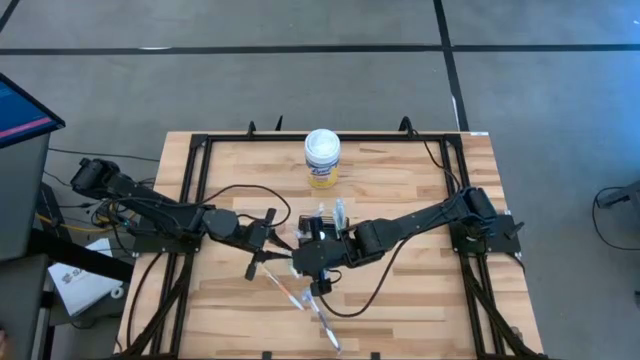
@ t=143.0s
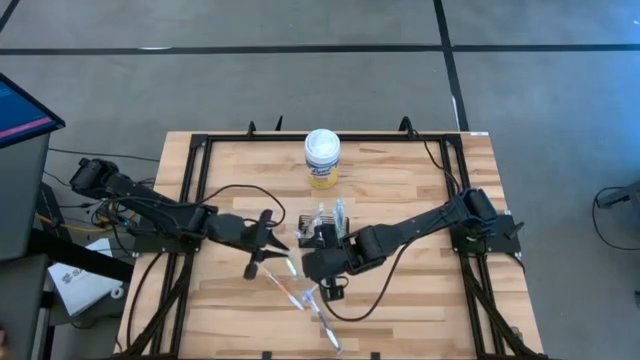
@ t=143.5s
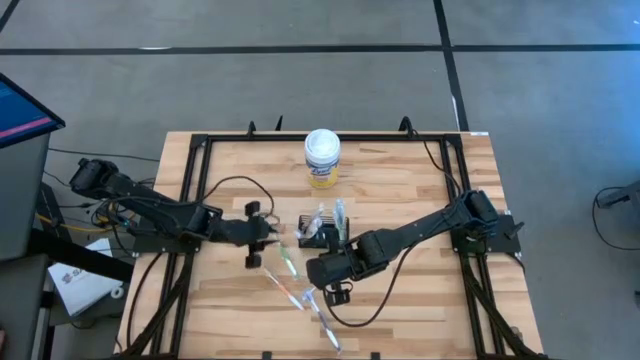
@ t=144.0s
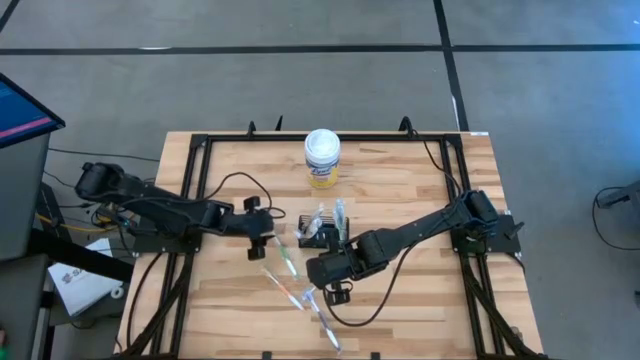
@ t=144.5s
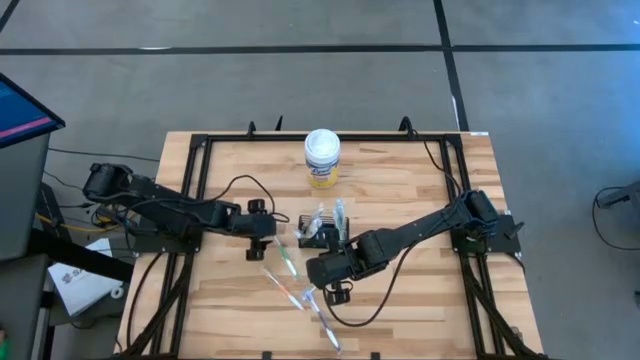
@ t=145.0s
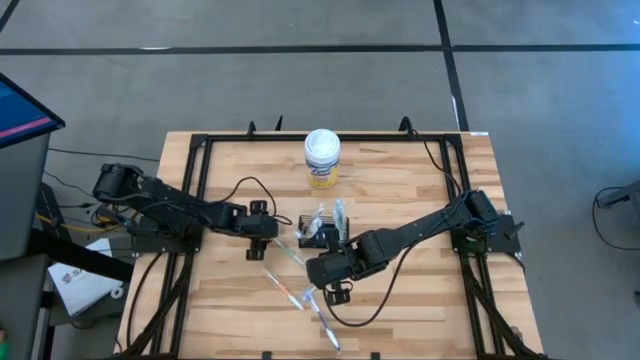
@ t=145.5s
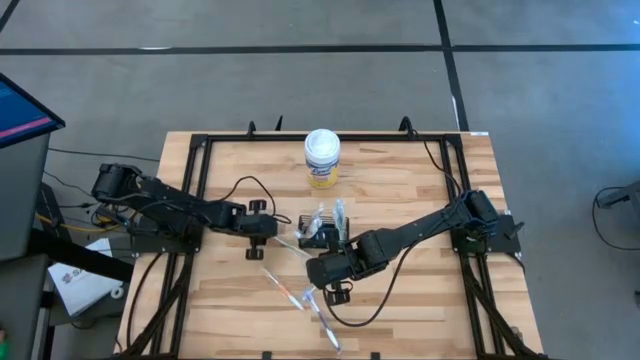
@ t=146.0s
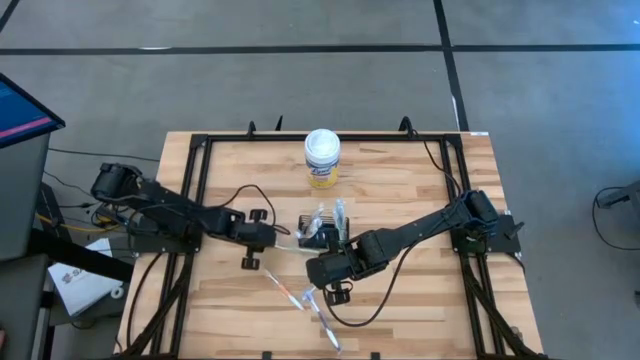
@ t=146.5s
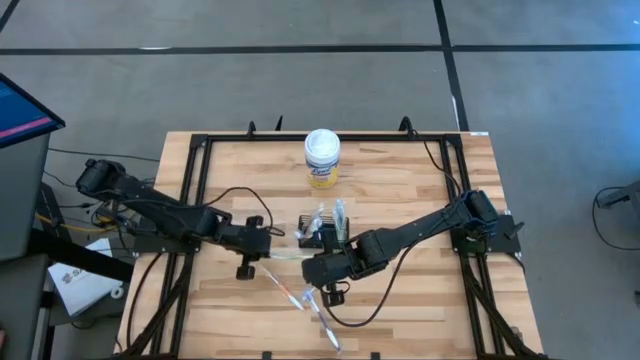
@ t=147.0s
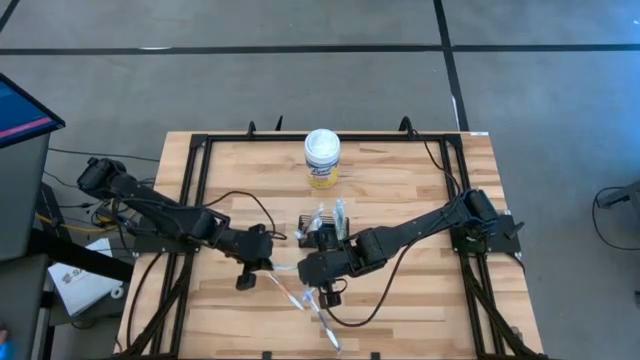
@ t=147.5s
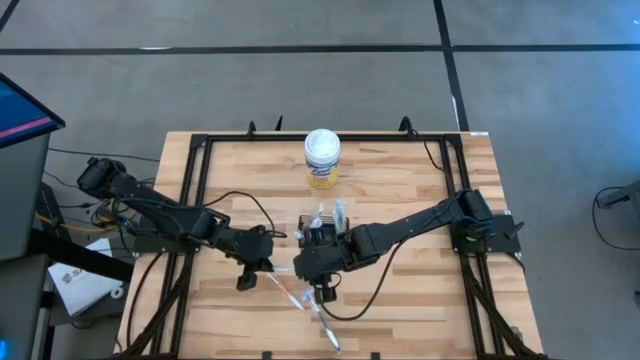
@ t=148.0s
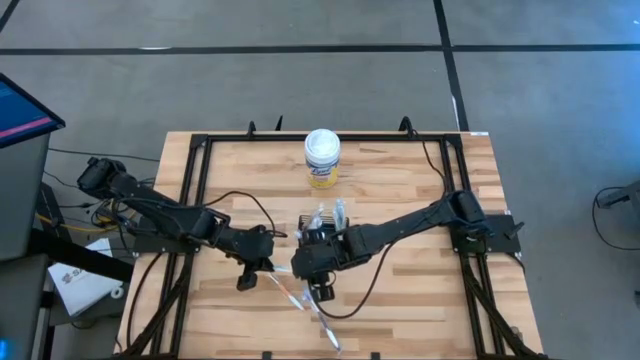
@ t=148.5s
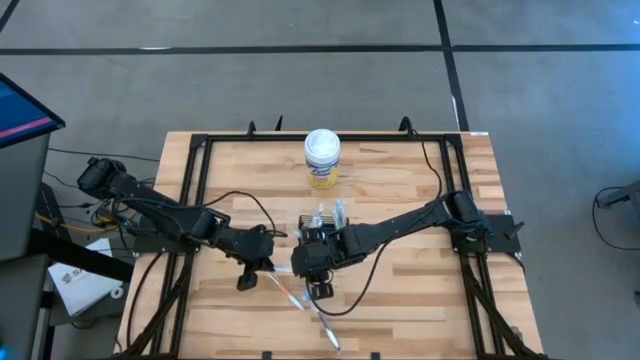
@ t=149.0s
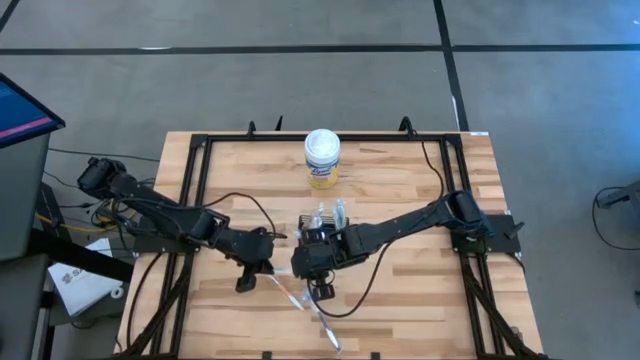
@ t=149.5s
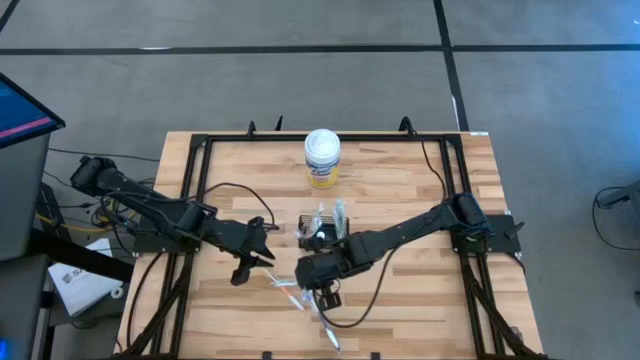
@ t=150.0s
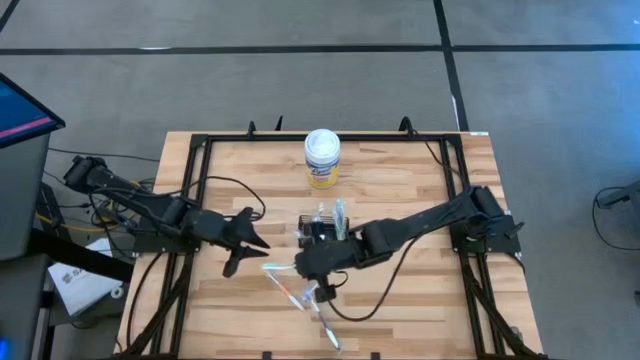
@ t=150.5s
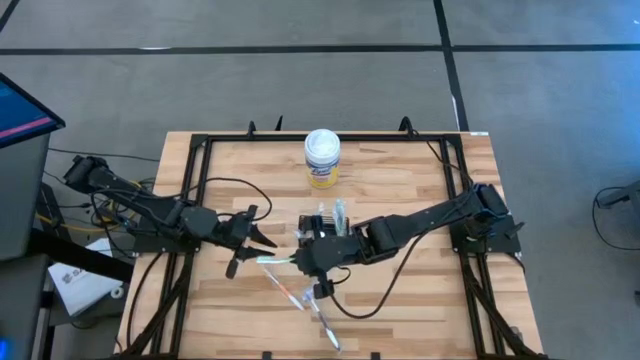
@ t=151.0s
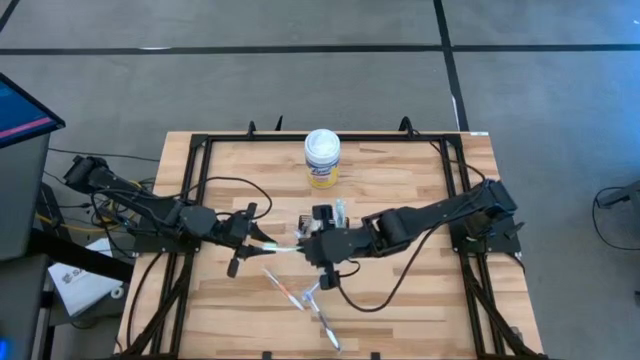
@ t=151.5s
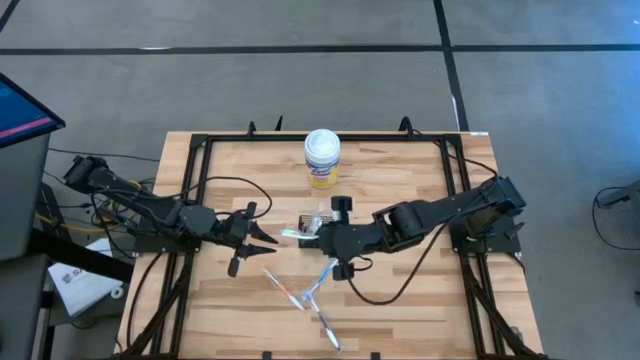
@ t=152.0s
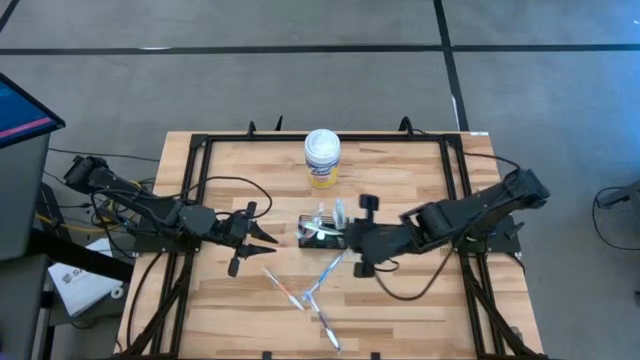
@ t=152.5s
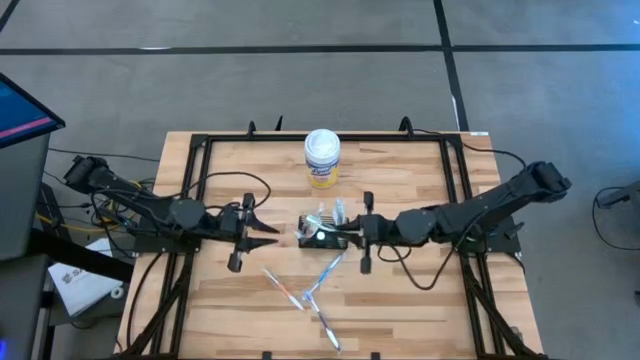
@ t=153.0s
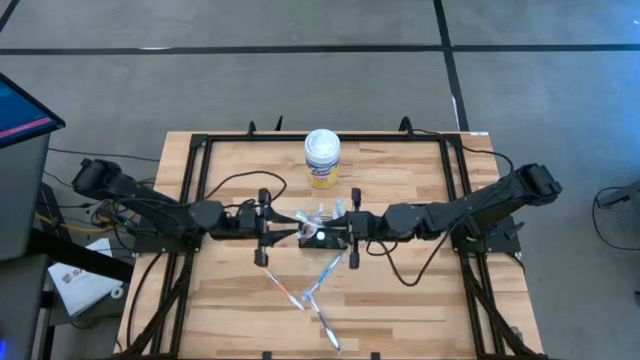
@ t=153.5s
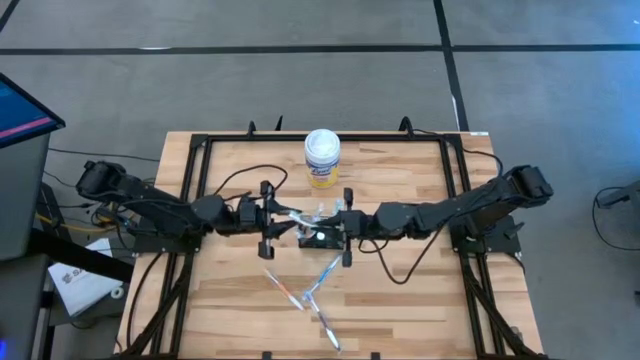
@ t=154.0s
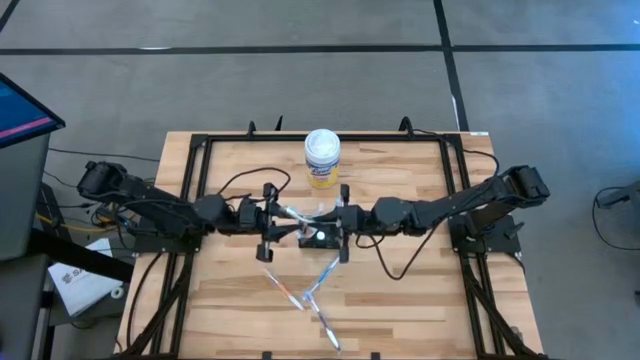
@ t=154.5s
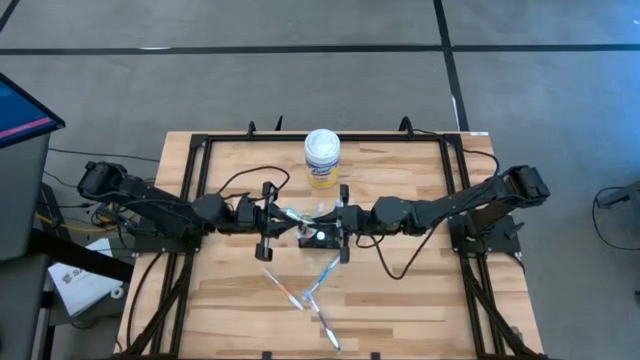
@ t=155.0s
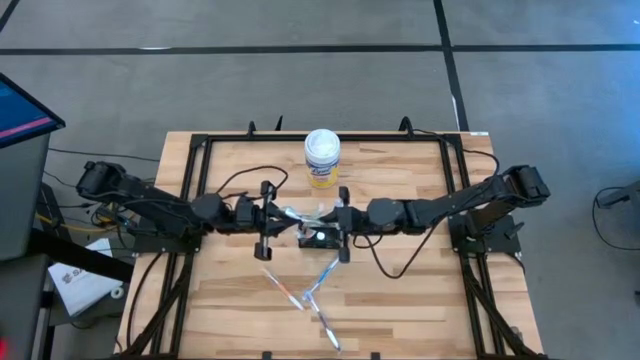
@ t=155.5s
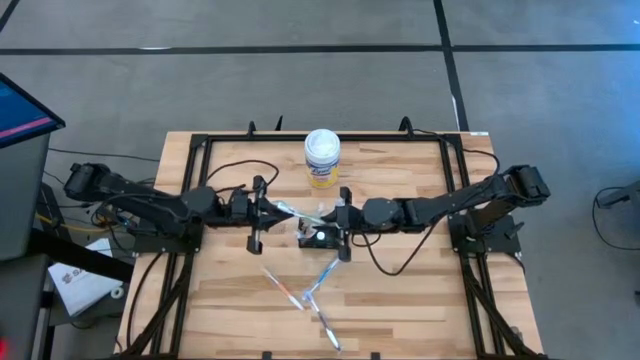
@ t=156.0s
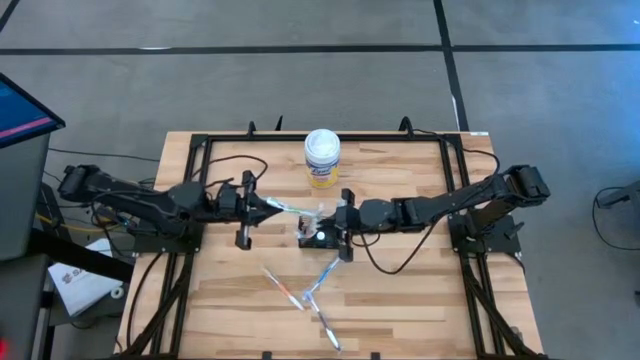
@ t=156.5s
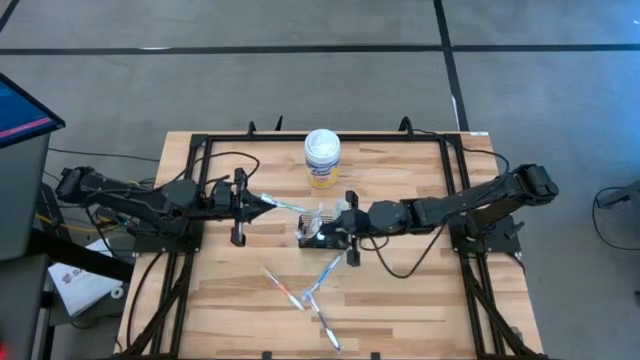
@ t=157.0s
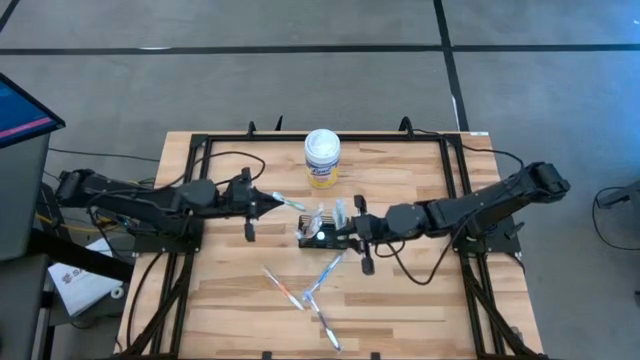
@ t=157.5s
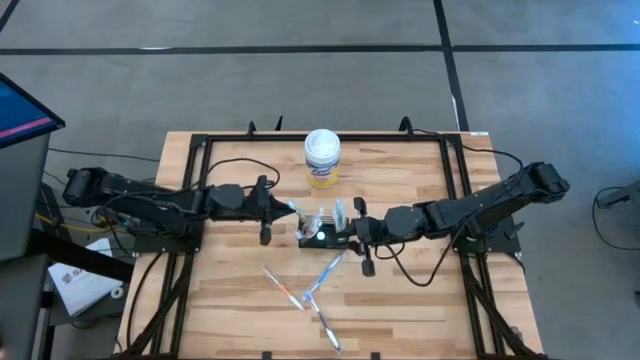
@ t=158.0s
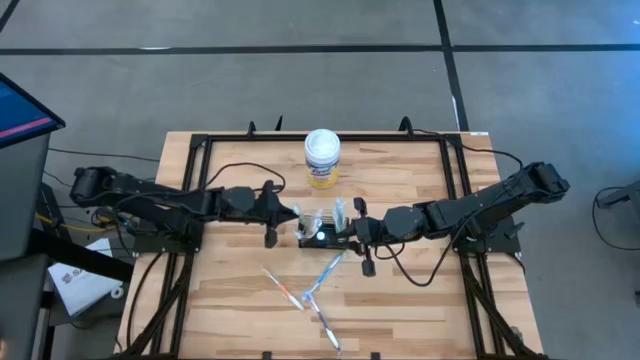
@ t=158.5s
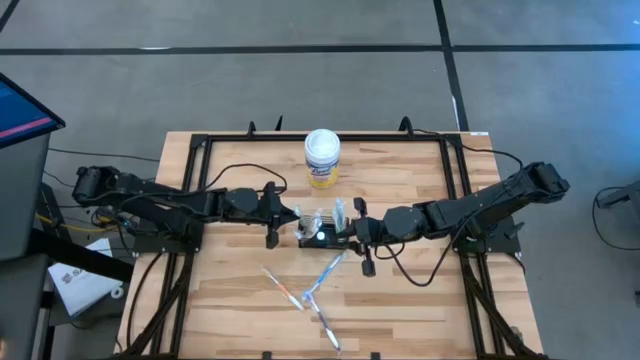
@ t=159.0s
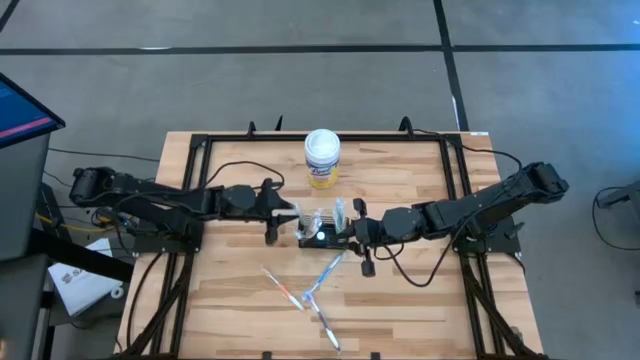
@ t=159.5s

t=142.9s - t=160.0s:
Task: Pick & Place toothbrushing station
Put the green toothbrush into the black mesh organizer

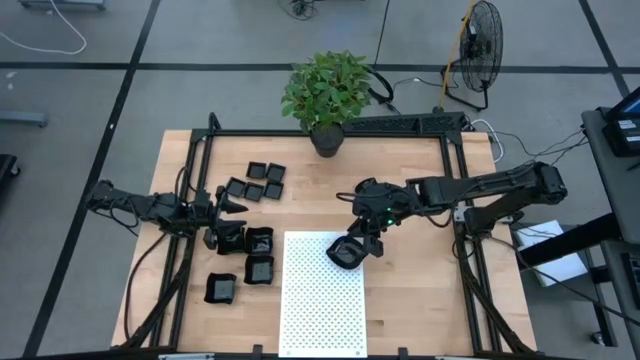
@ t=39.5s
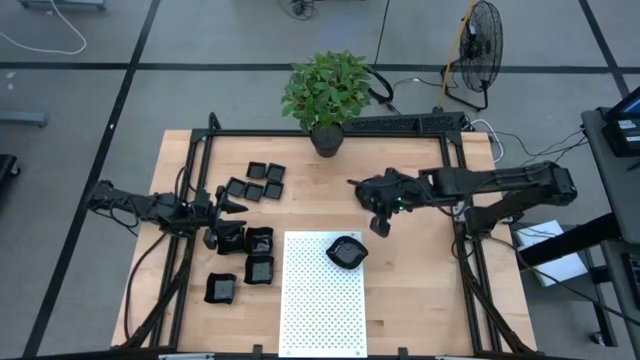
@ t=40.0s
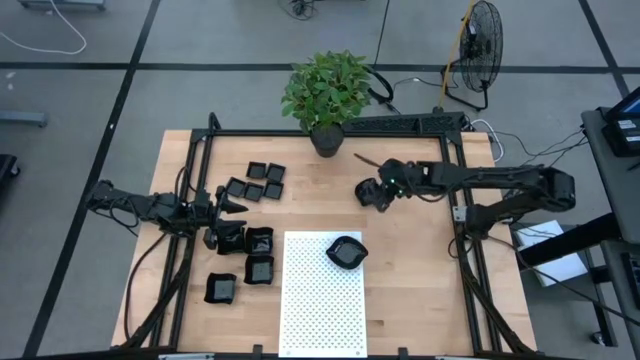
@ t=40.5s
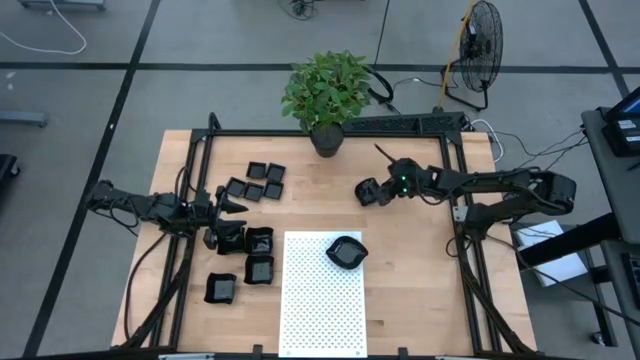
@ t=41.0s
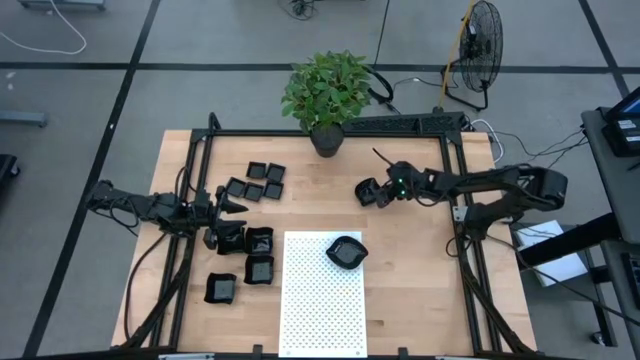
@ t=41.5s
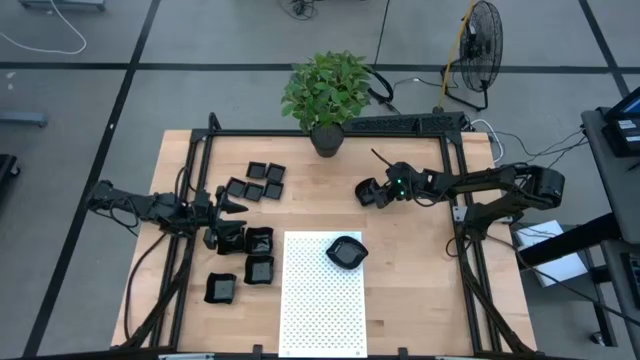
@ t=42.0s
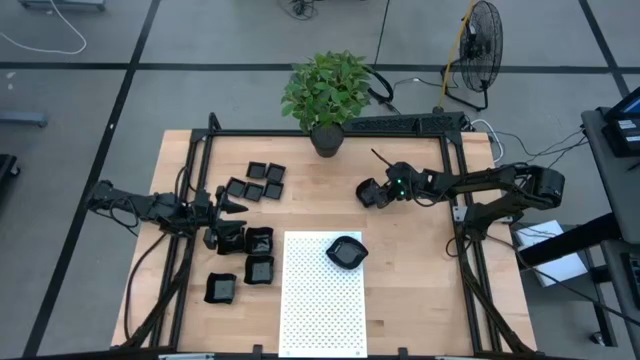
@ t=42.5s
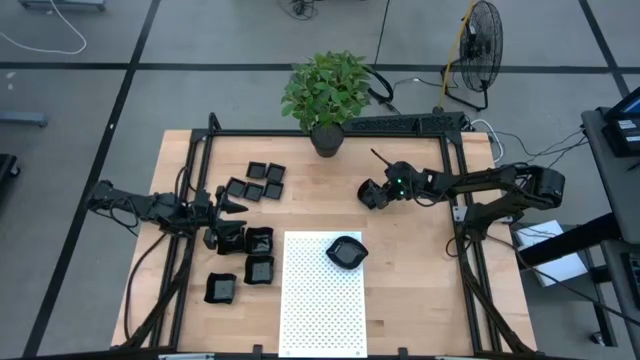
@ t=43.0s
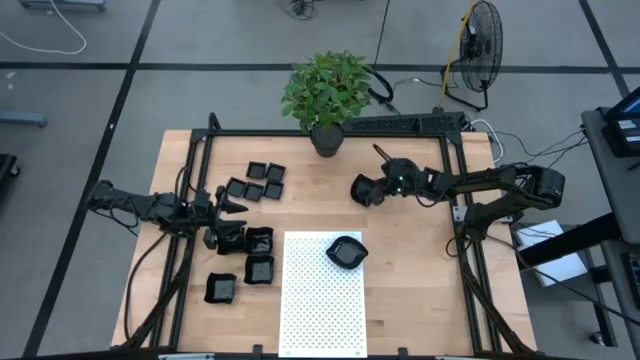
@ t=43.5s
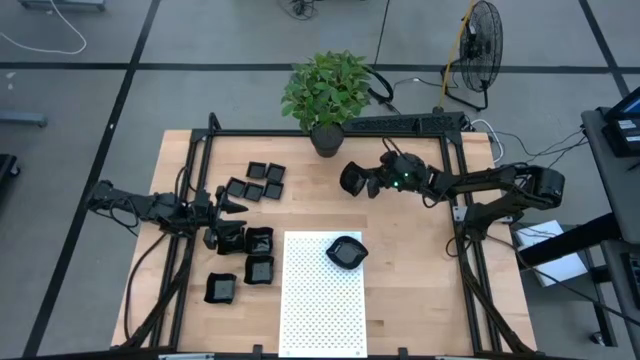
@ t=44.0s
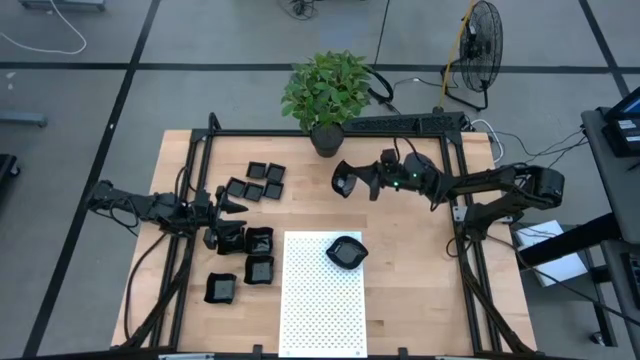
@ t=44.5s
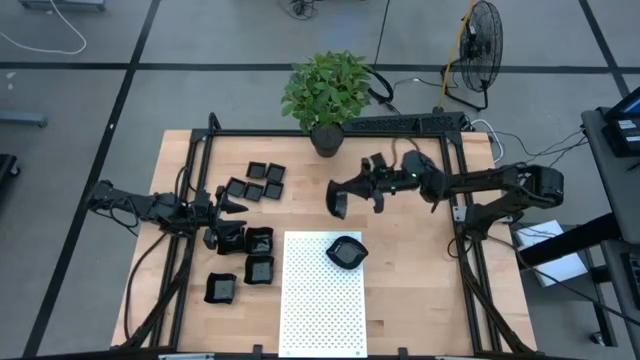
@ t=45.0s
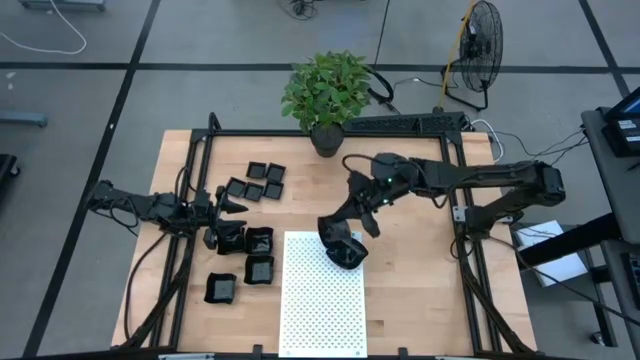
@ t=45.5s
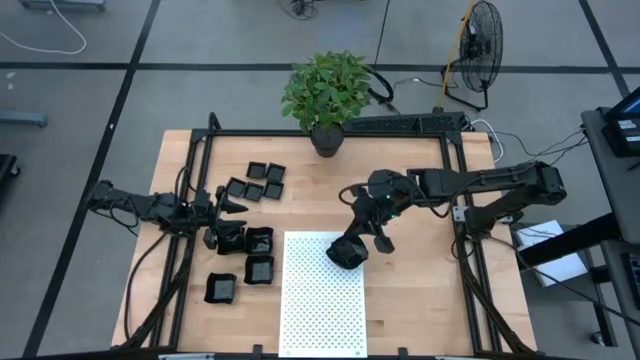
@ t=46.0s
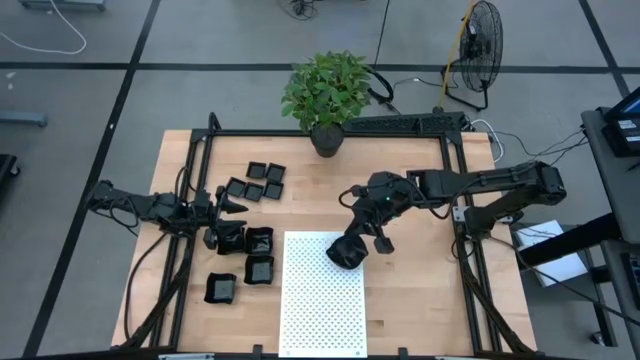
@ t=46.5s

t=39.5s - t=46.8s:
Task: Pick & Place Mini shaped plates
Stack the leaf shaped plate on top of the leaf shaped plate on the shelf
